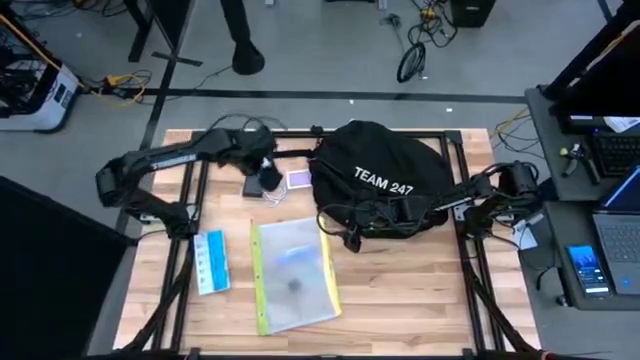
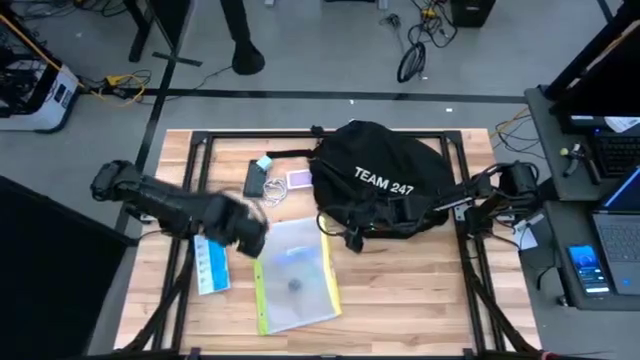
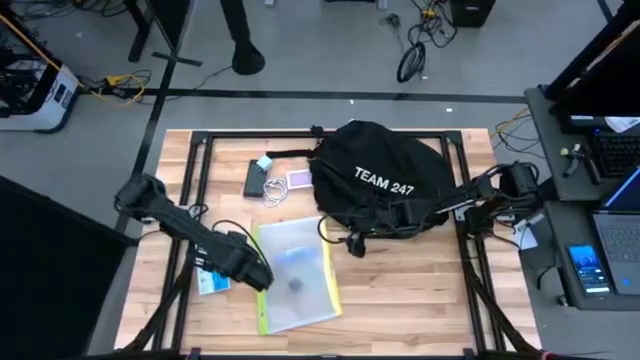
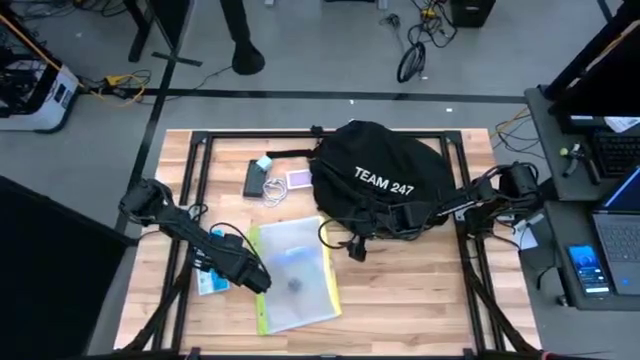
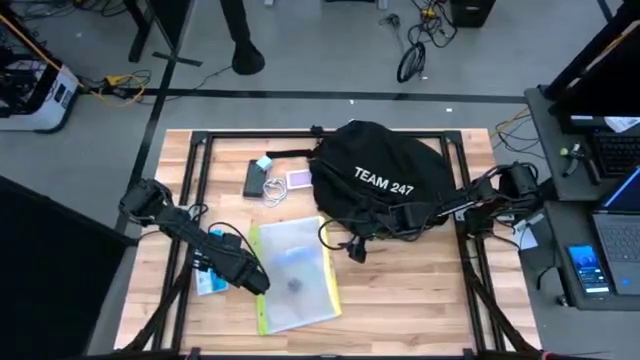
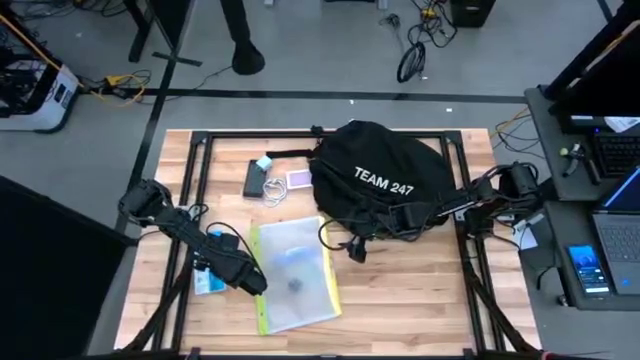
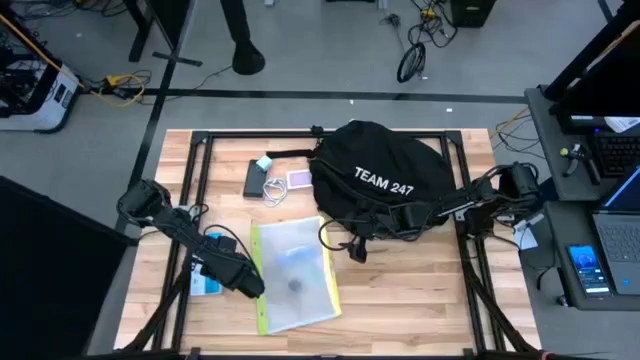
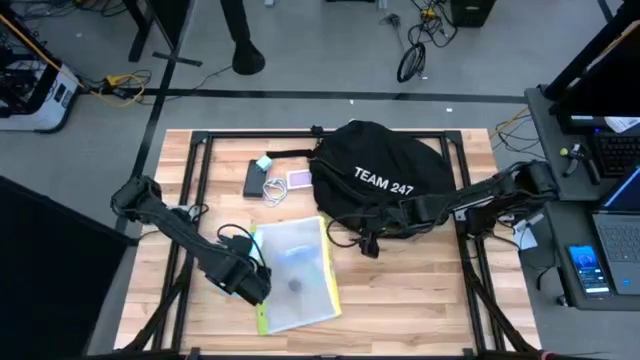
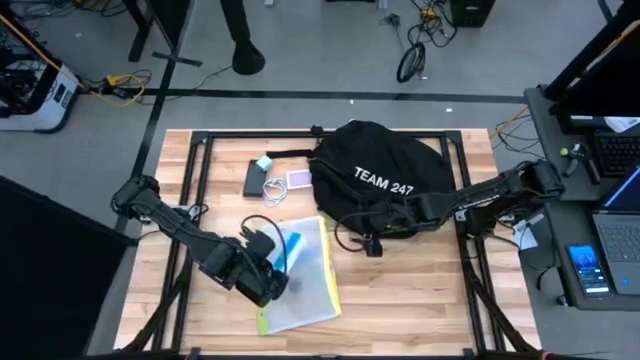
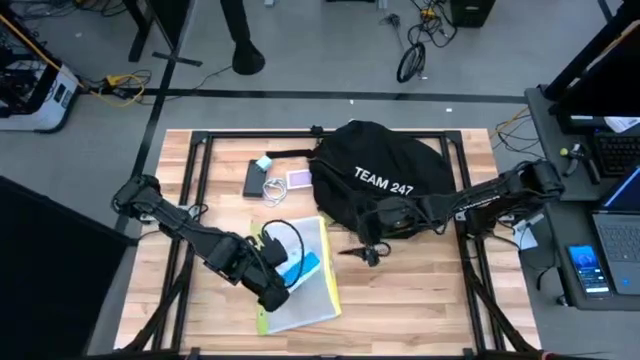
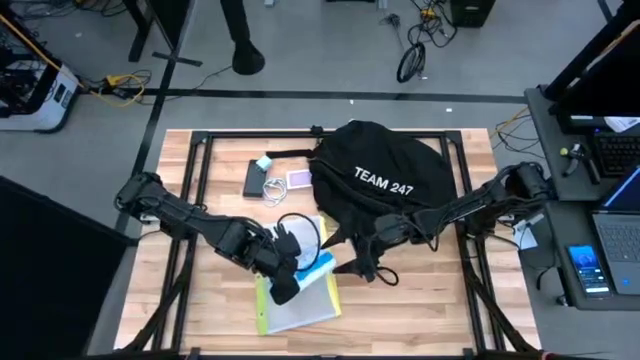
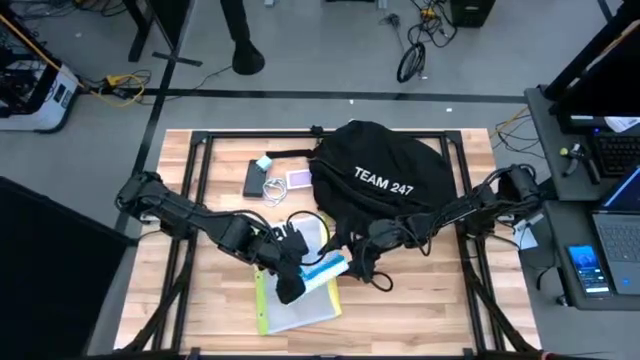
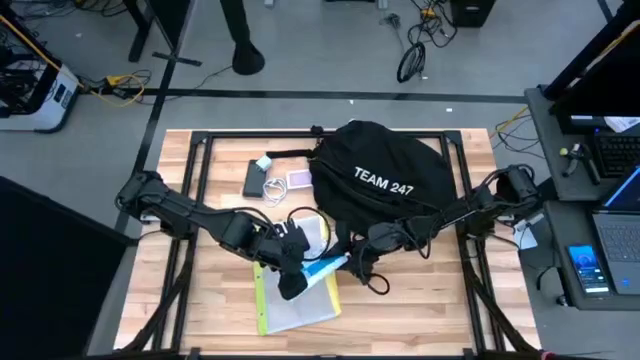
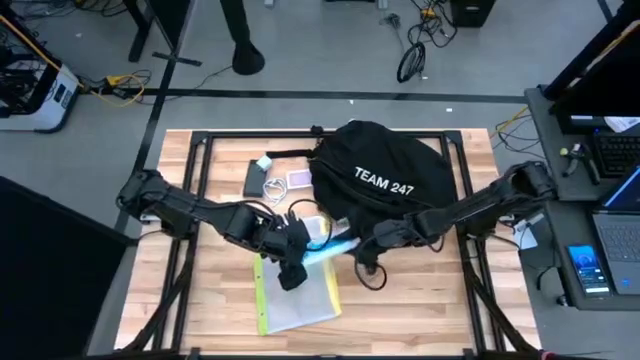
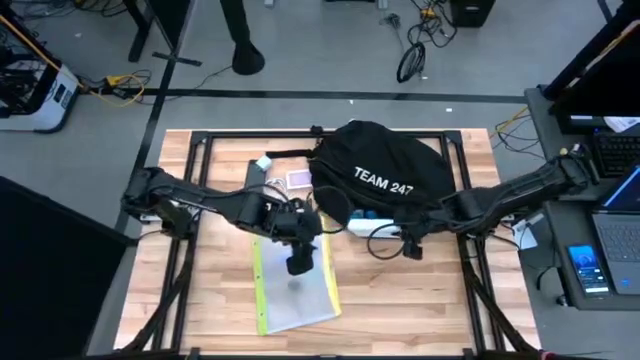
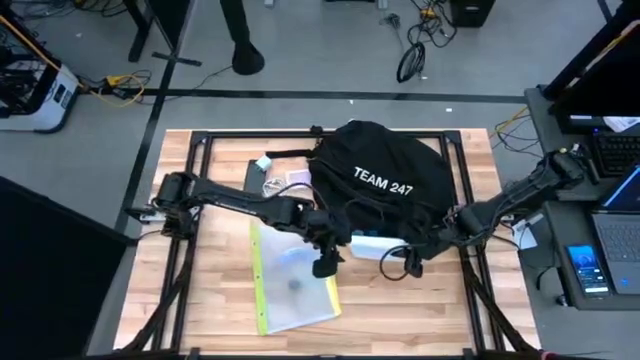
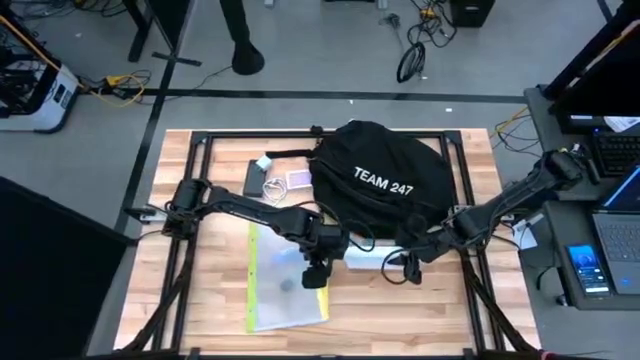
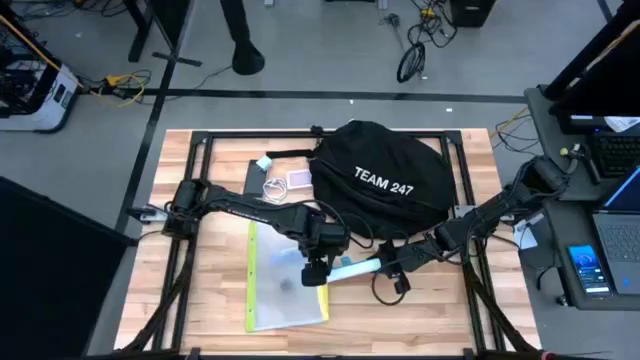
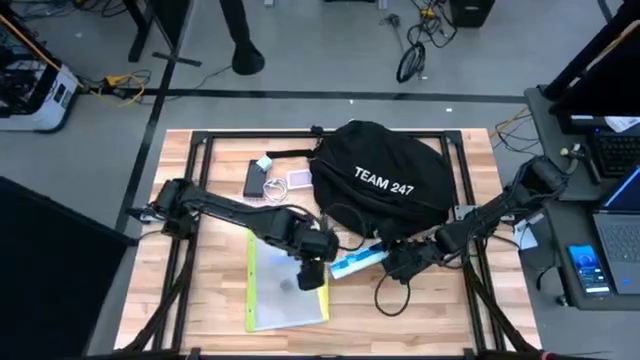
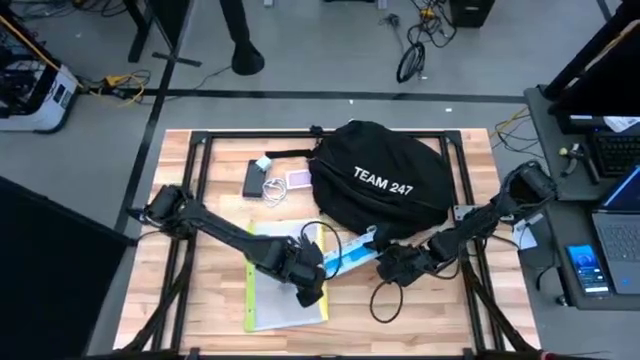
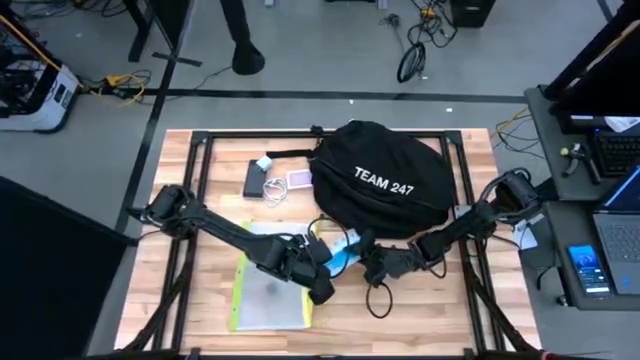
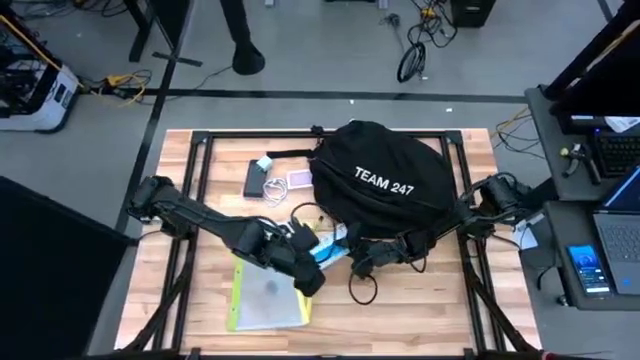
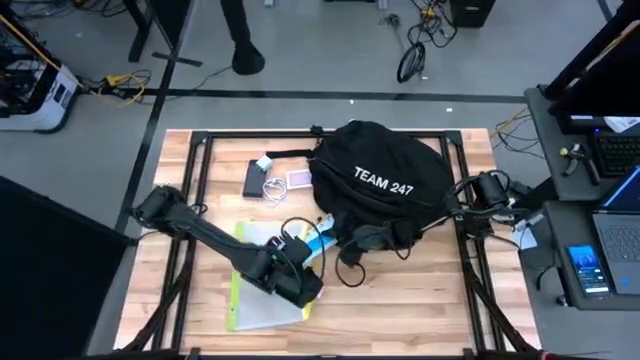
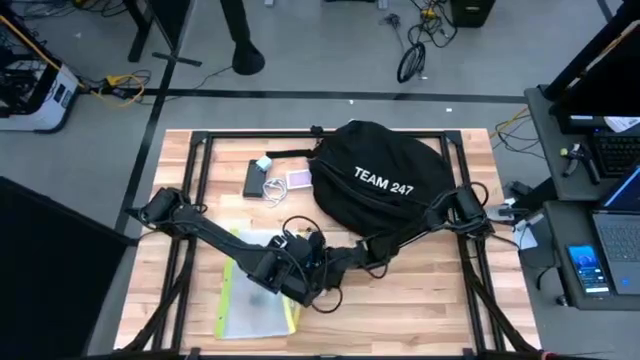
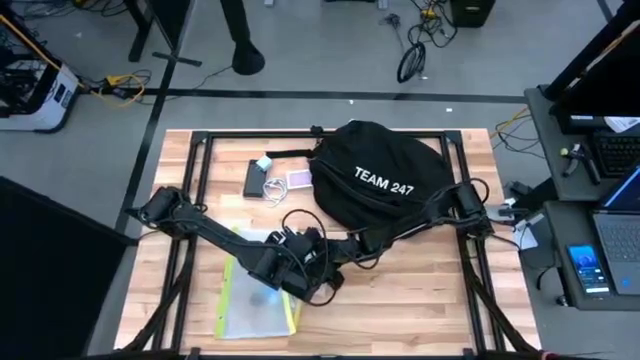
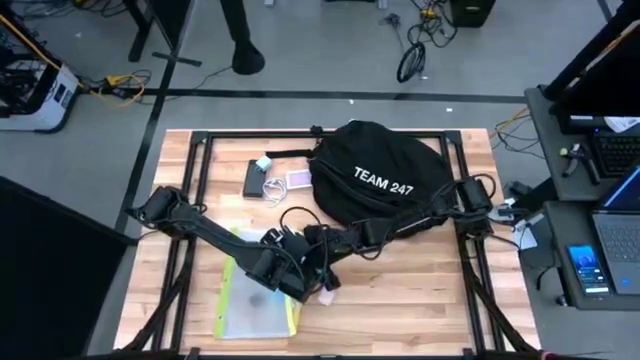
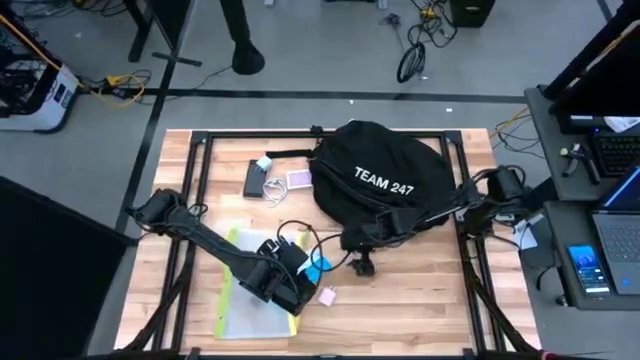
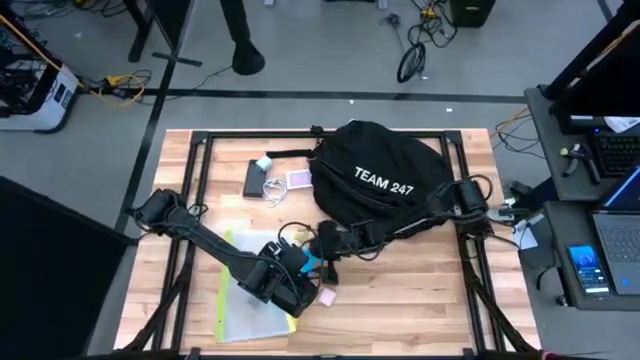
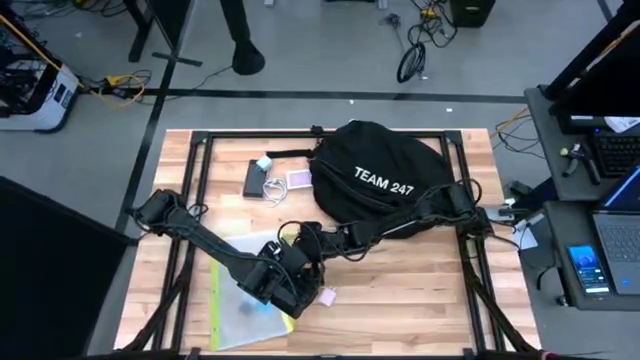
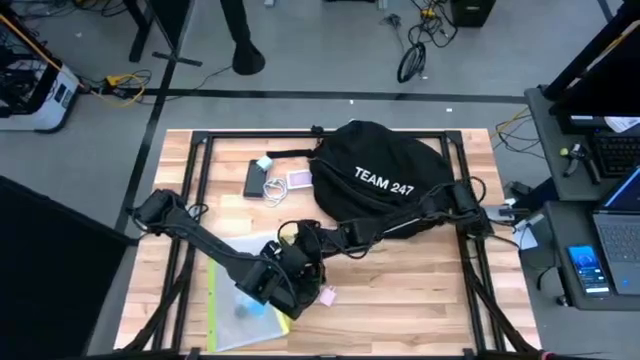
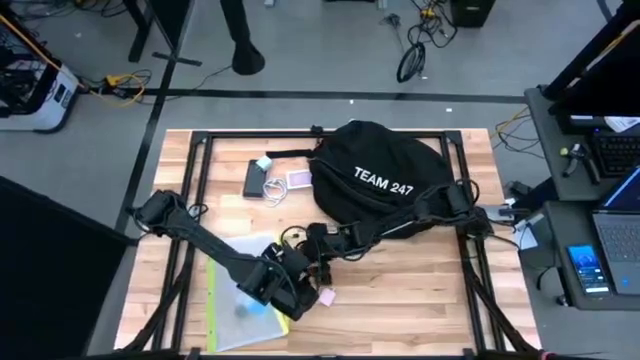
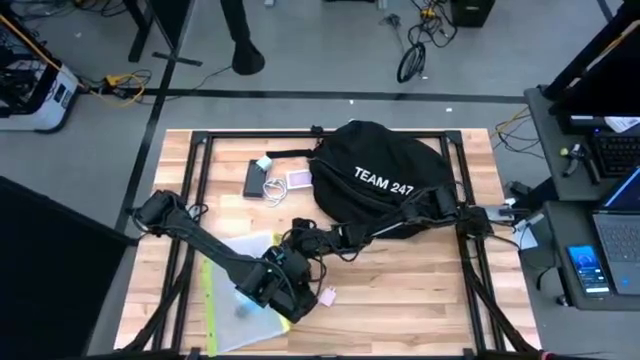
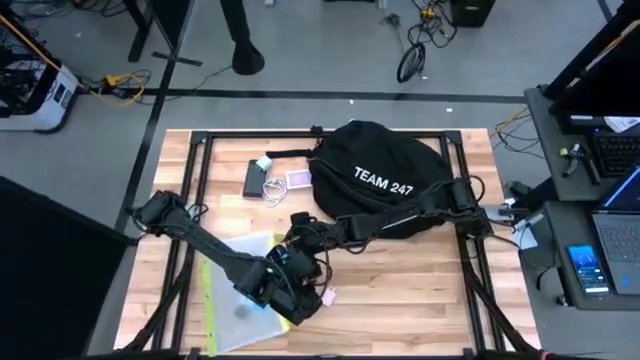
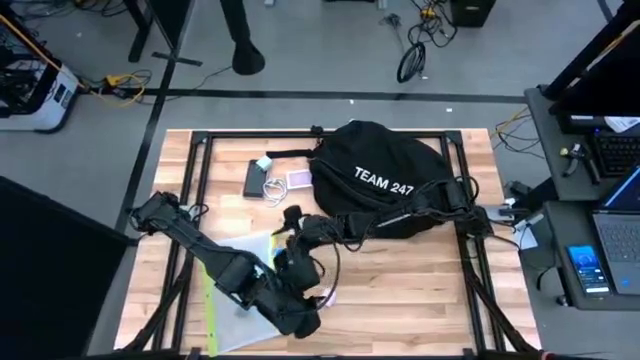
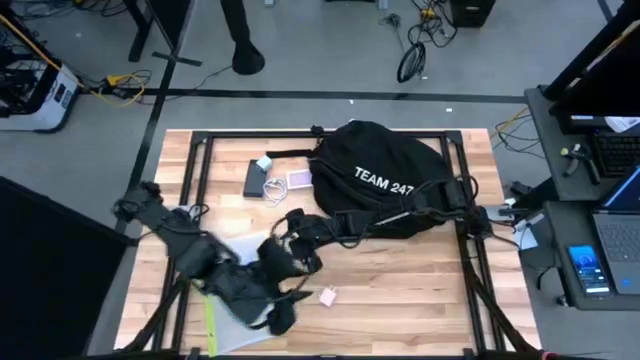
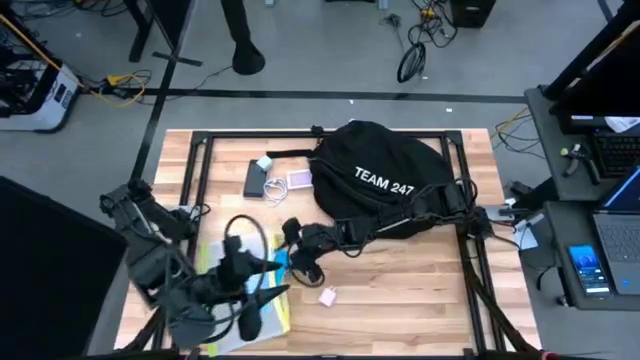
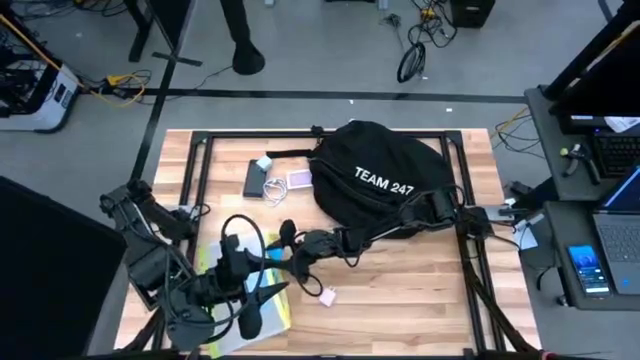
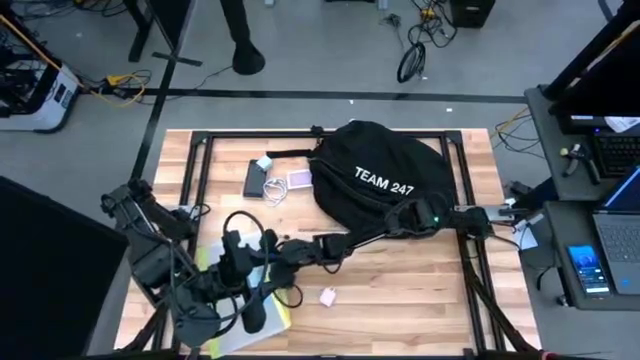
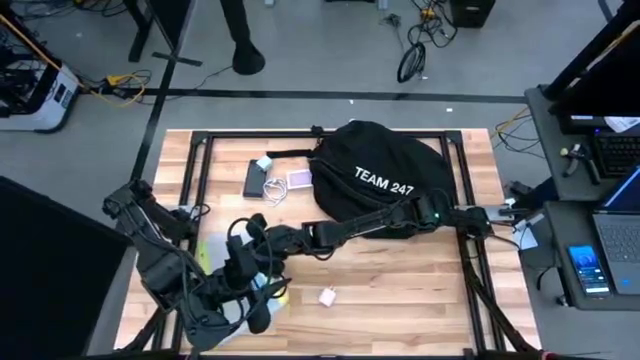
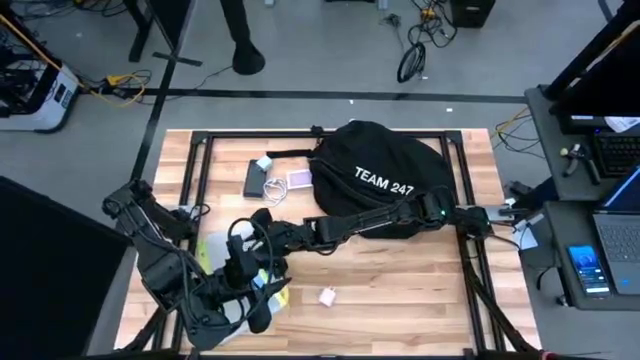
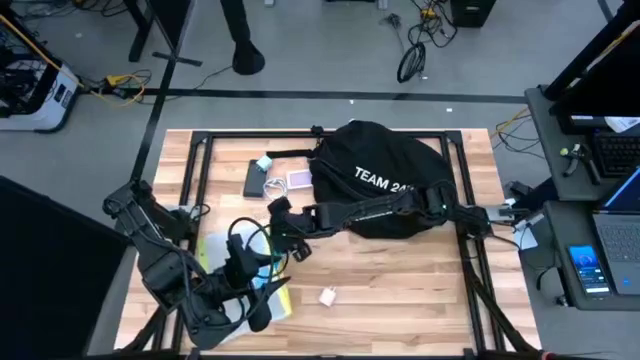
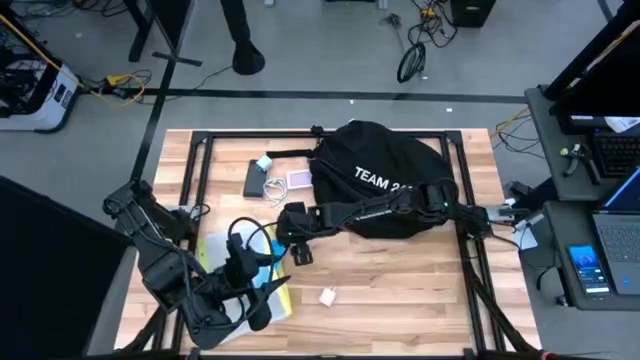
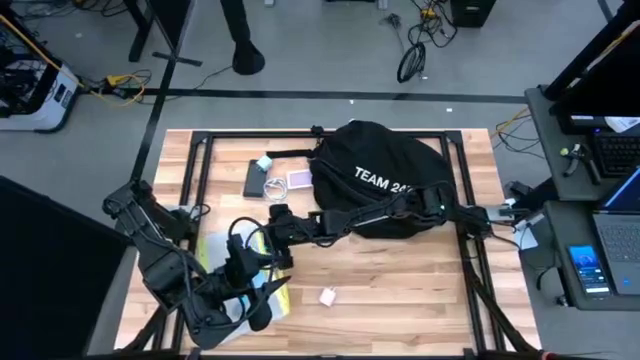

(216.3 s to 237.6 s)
Task: Unpack backpack
Put the medicine organizer into the green zip bag

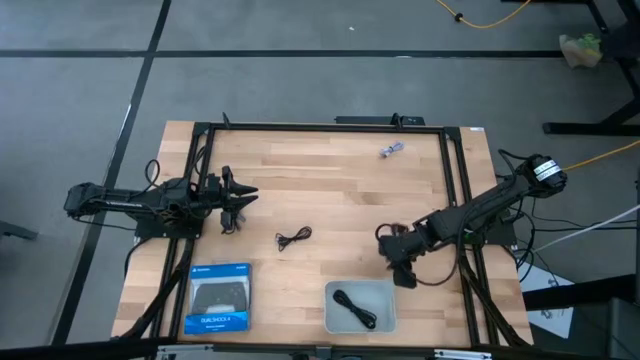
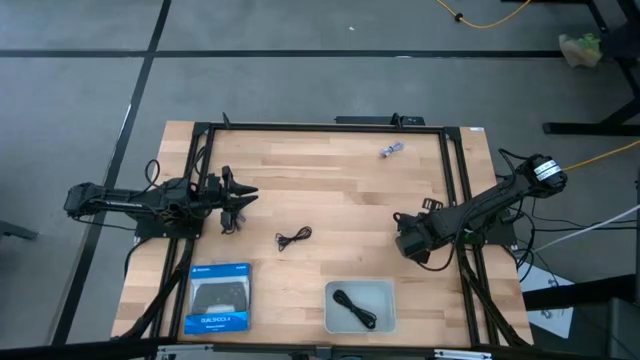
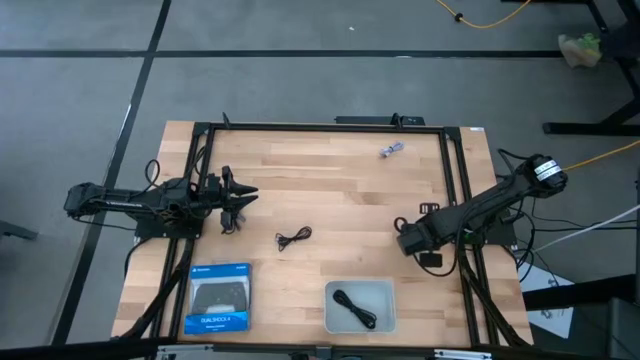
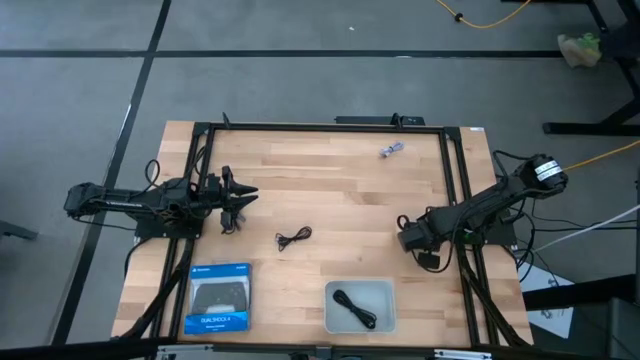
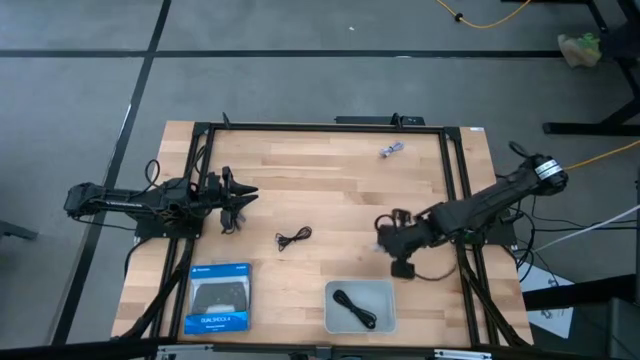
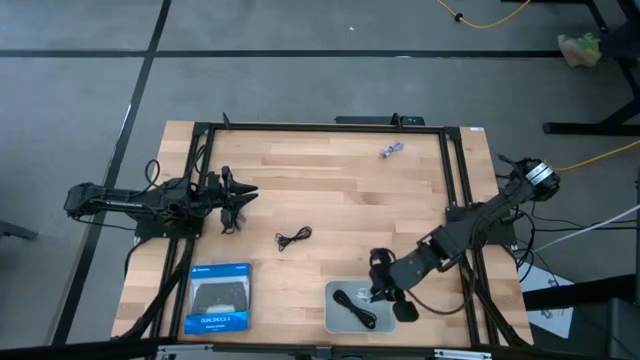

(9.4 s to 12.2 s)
Task: Pick and place USB-C Cables
Put the white USB cable into the white bin
